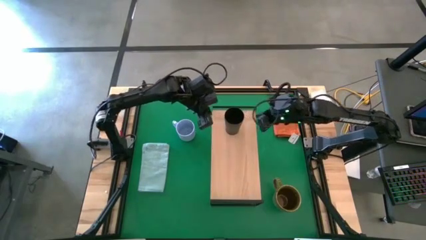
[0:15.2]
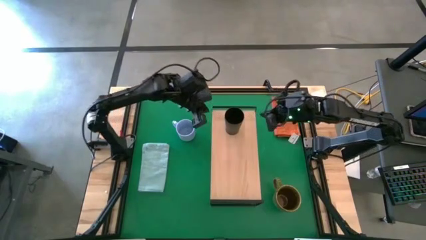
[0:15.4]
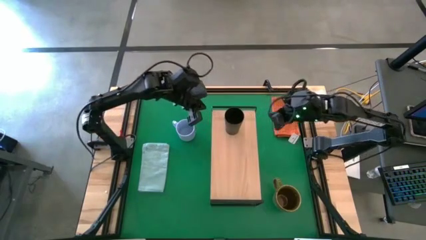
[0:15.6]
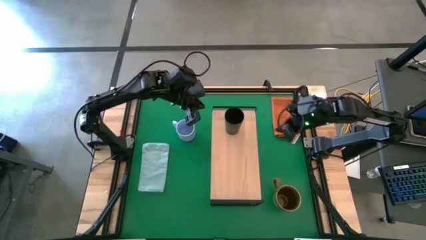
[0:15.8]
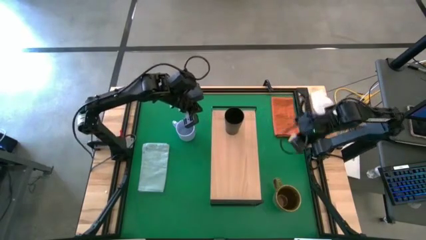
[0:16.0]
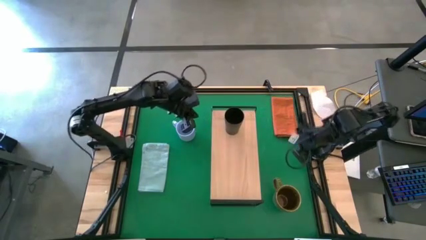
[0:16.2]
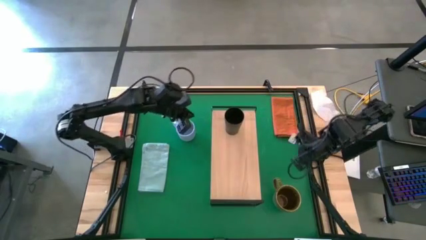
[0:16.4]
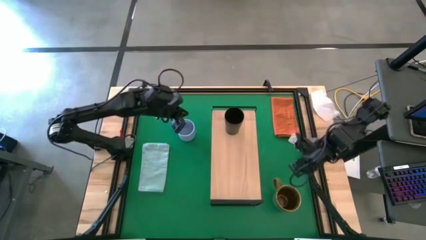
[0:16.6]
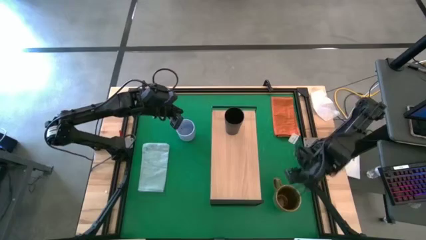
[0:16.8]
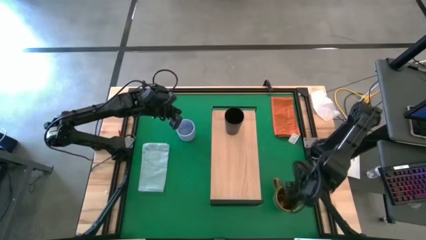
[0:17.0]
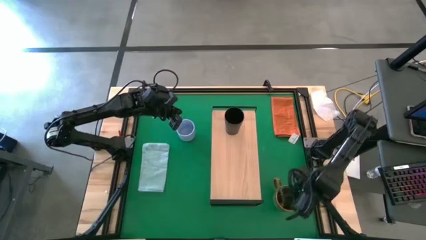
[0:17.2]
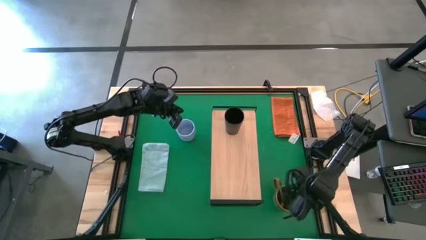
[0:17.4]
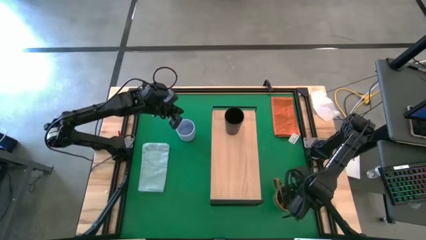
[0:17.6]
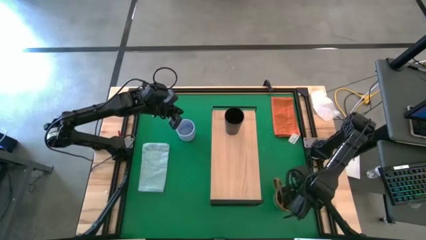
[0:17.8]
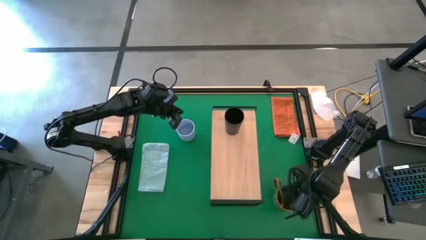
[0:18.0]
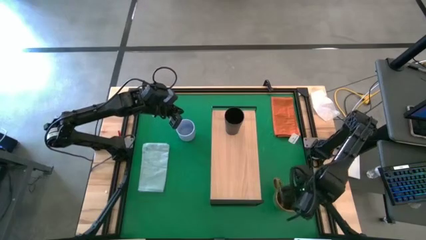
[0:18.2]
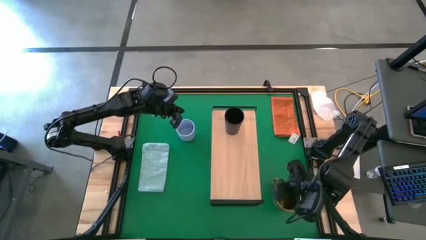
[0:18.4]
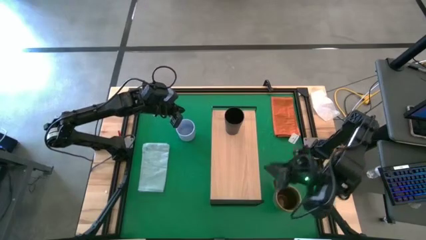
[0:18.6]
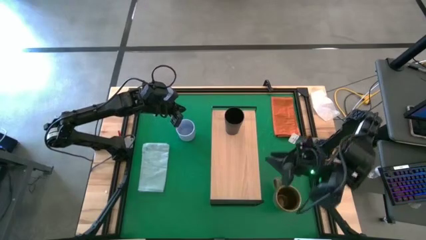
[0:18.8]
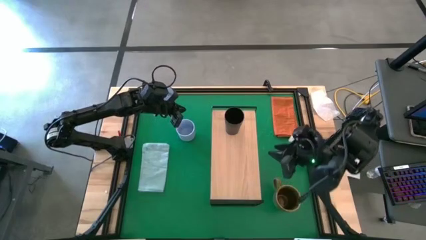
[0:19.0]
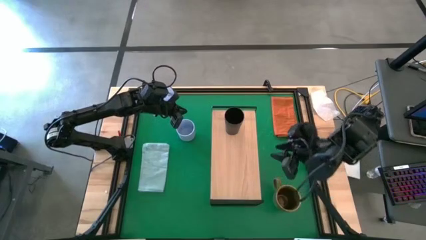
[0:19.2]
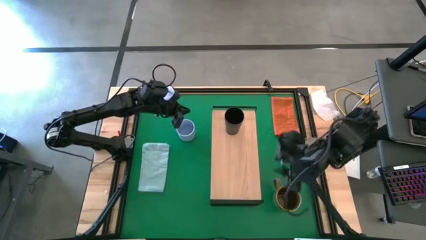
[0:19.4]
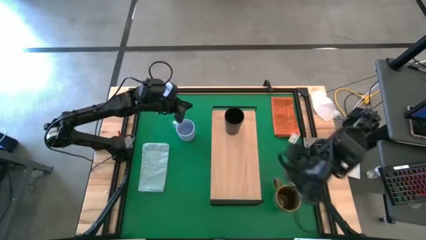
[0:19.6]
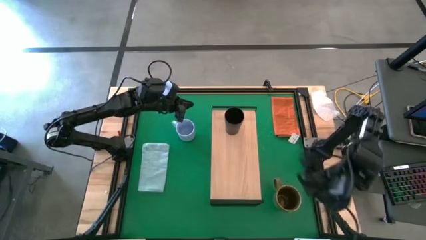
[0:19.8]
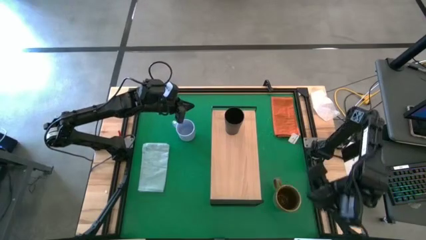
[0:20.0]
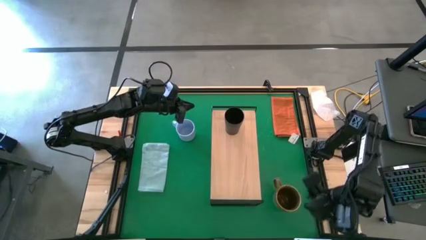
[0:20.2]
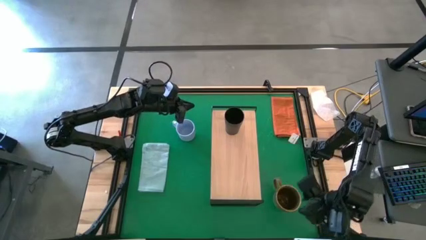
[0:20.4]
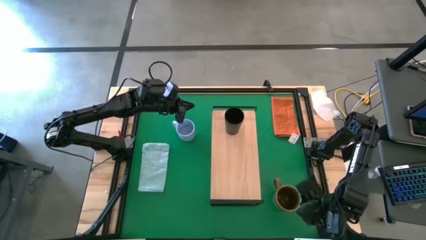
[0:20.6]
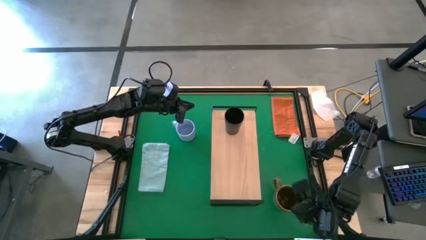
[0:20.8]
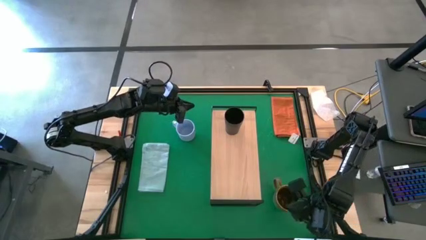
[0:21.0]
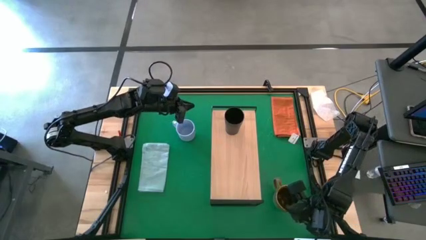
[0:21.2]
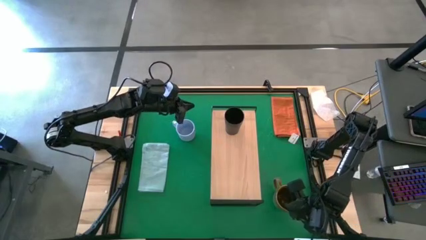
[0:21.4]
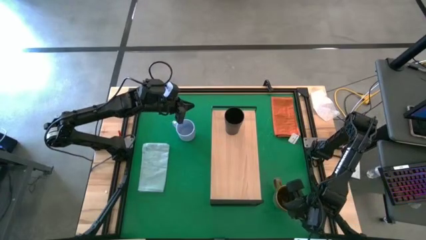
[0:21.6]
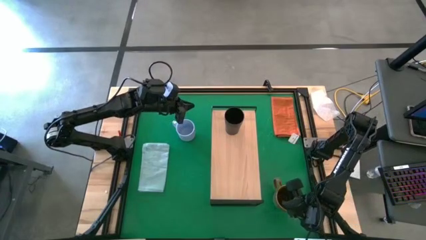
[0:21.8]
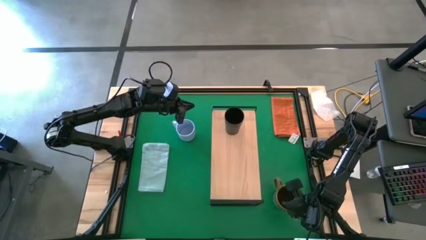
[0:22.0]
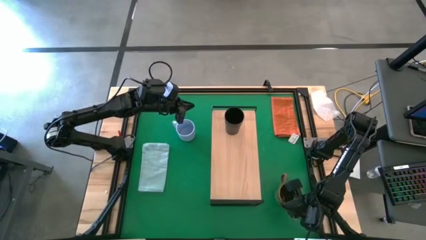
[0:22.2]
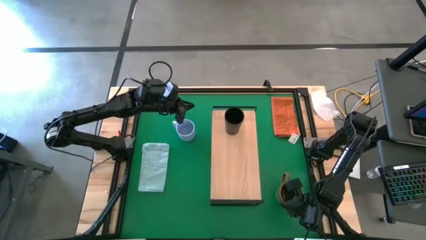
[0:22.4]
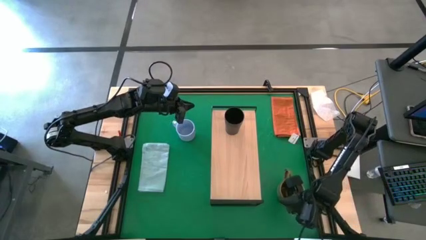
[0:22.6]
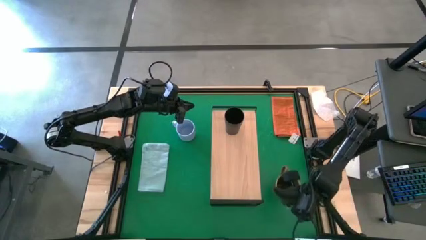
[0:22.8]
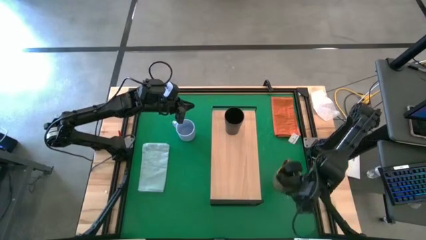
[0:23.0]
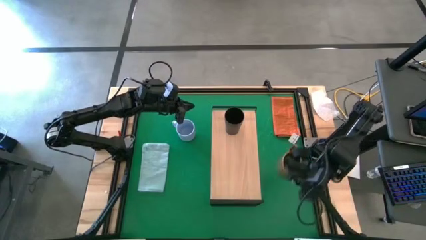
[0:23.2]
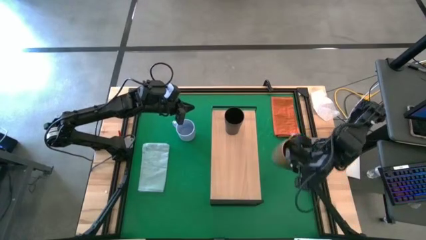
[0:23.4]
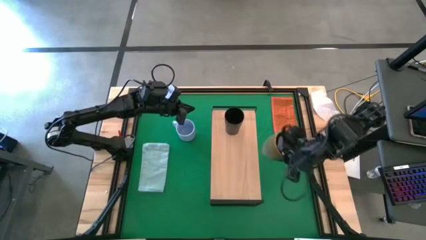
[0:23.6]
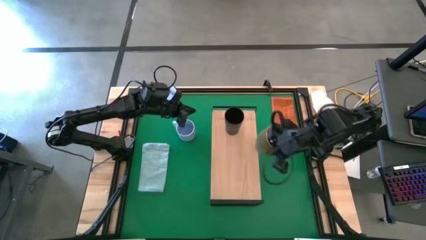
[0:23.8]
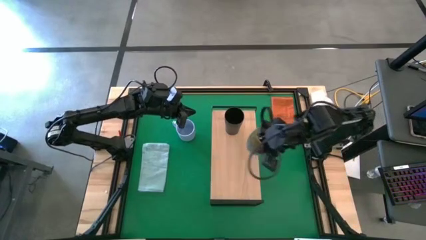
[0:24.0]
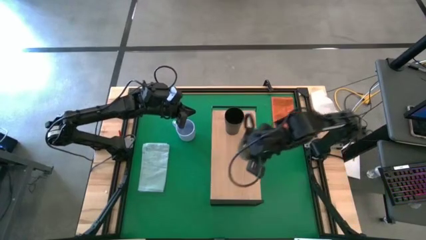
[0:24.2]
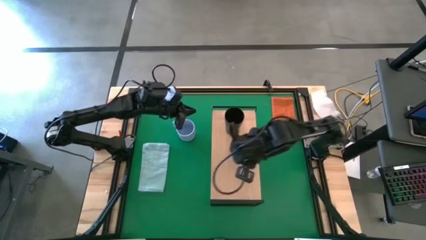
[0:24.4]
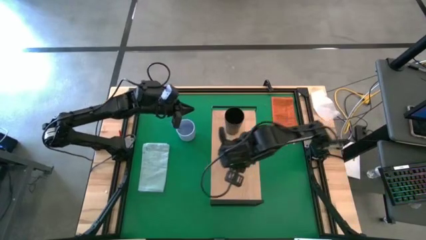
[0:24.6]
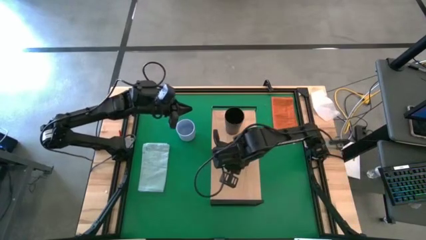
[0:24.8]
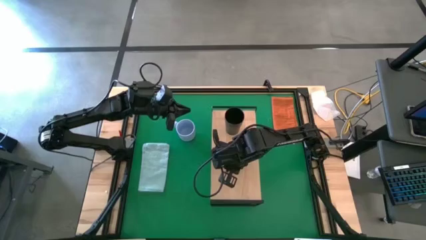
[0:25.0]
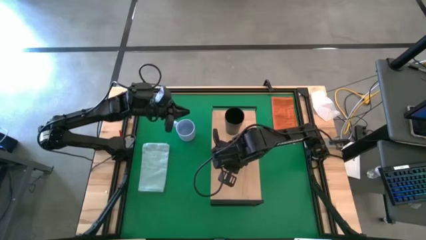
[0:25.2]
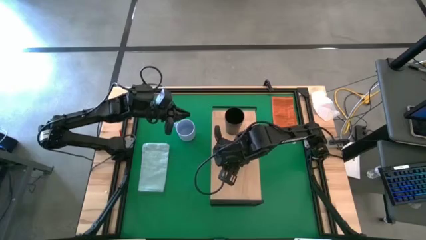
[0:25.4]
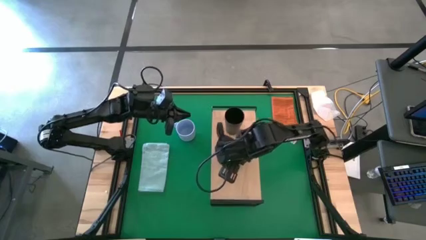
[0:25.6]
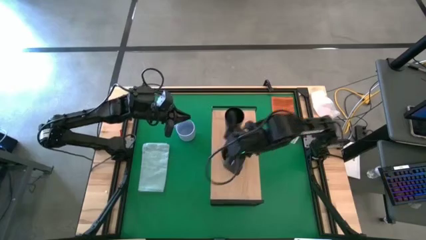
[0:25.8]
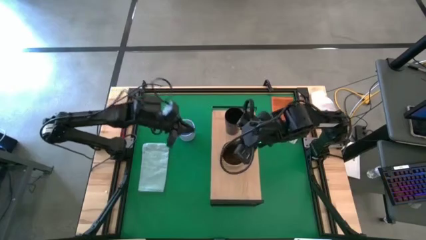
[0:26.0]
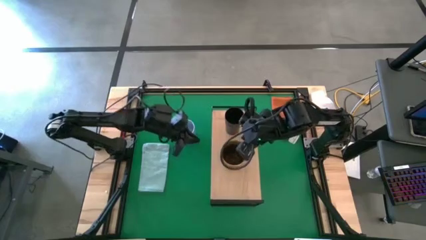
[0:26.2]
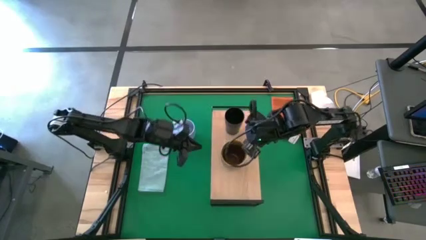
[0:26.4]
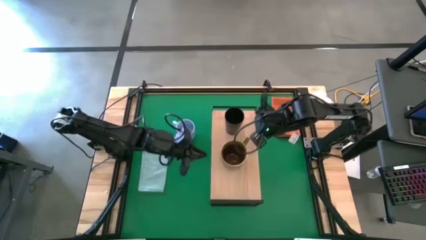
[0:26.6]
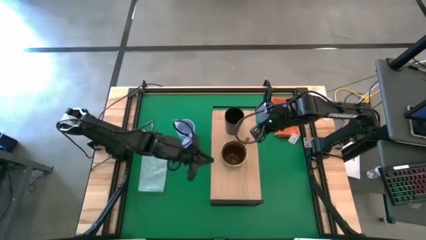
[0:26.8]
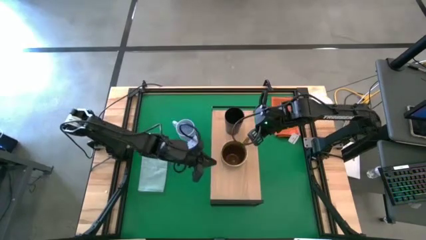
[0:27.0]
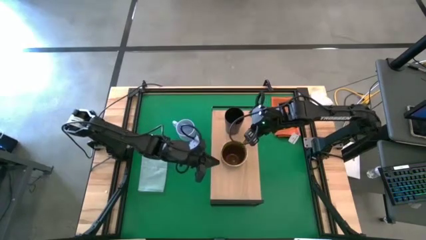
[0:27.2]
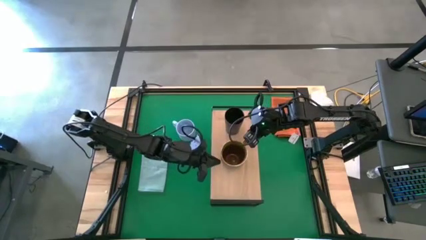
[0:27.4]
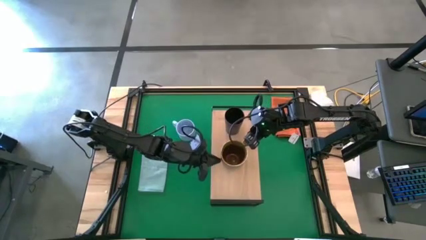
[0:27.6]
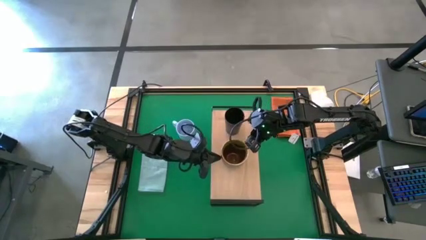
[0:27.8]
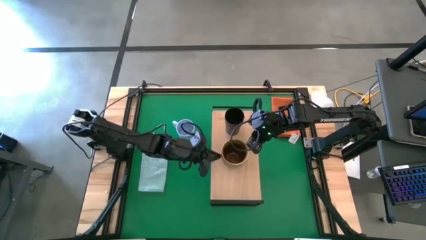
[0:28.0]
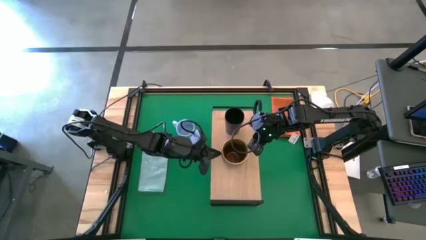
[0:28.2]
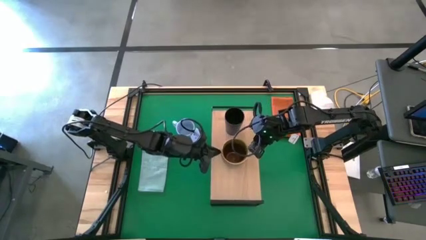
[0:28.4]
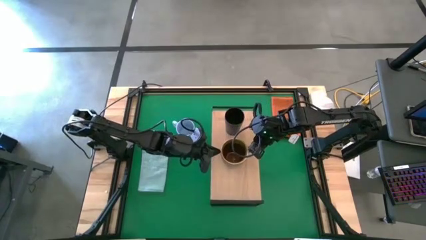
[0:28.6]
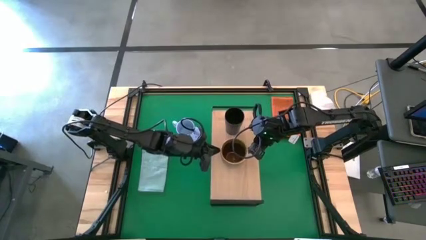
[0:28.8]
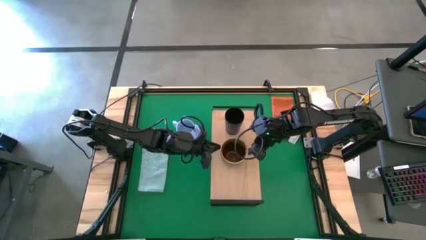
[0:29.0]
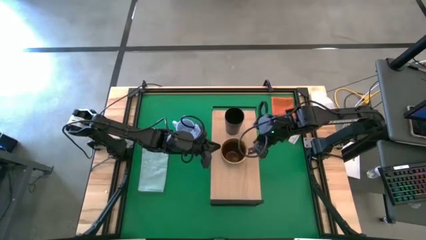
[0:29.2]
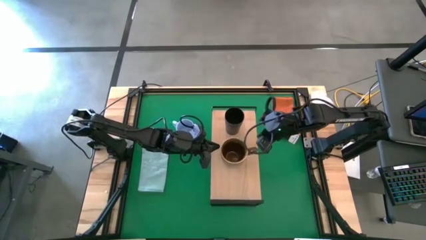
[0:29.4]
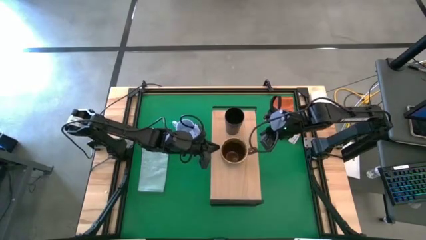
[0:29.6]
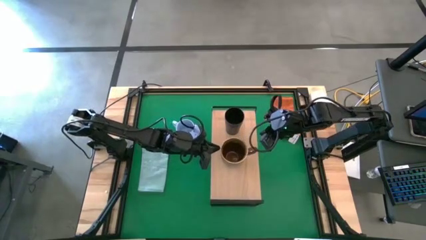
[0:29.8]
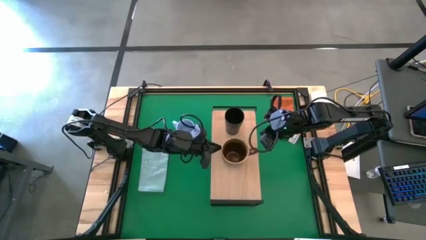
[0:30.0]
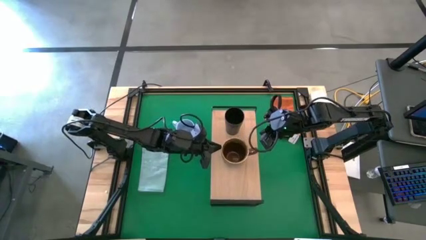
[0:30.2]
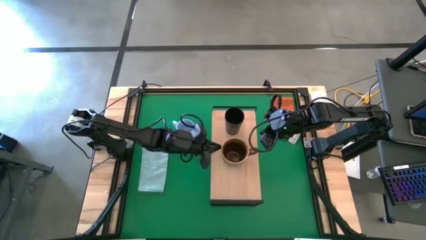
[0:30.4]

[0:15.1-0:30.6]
Task: Stack small to large cups/mugs on shelf
Put the green cup on the shelf aligned with the black cup

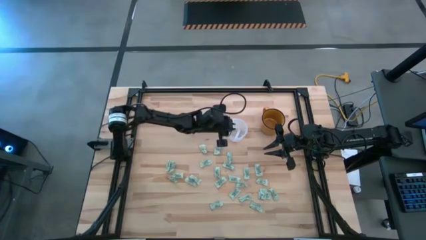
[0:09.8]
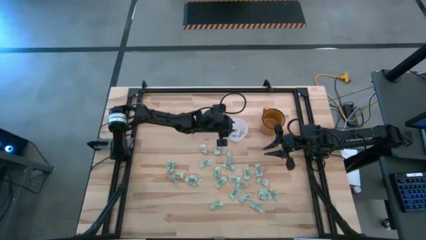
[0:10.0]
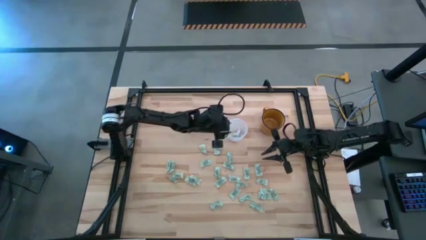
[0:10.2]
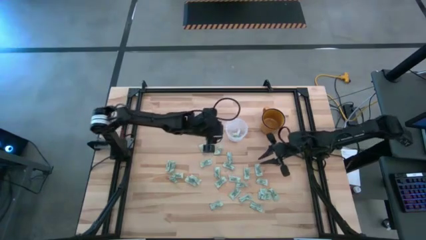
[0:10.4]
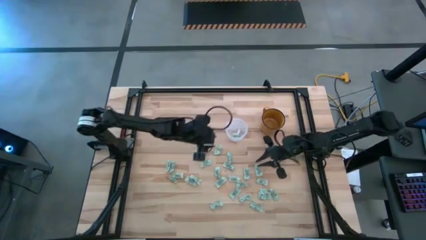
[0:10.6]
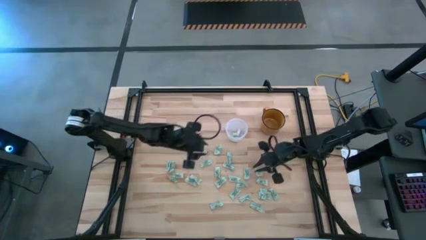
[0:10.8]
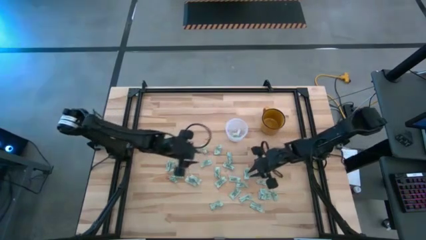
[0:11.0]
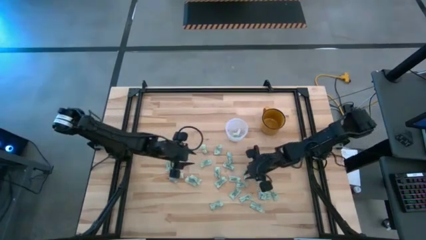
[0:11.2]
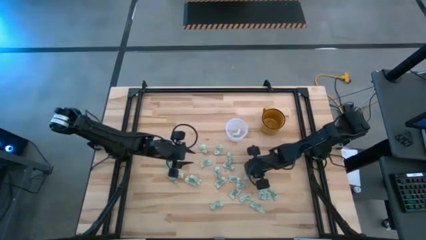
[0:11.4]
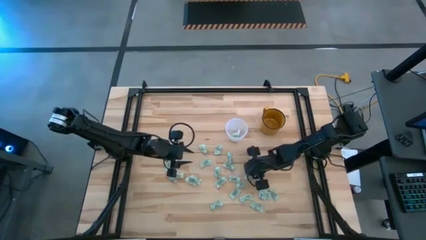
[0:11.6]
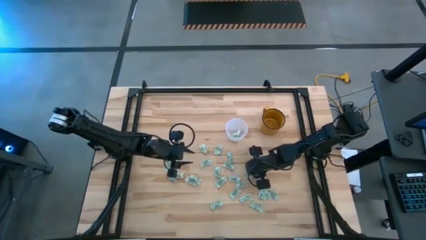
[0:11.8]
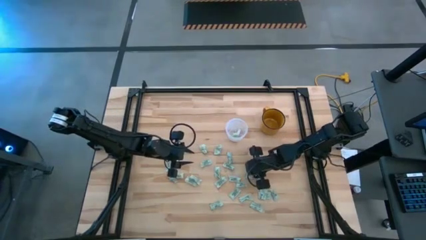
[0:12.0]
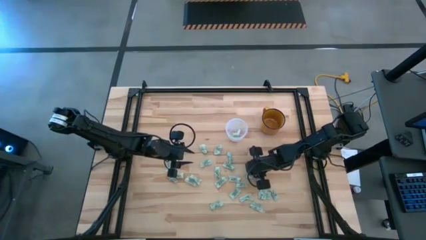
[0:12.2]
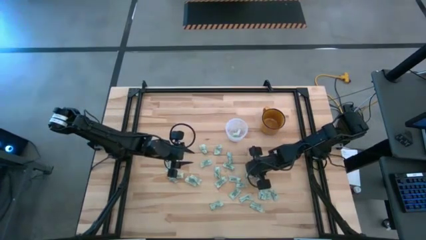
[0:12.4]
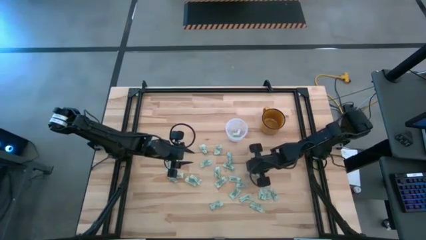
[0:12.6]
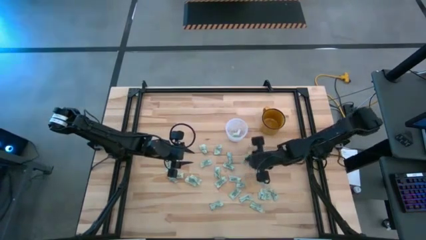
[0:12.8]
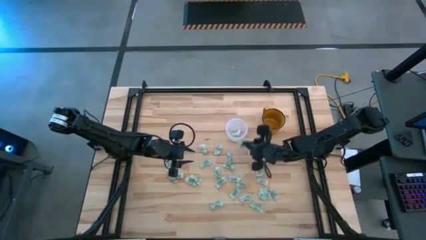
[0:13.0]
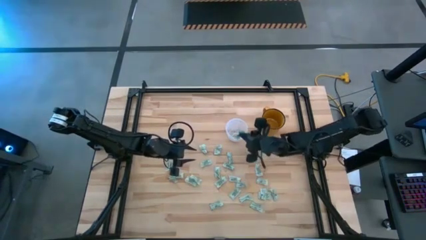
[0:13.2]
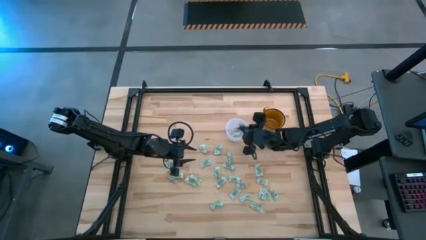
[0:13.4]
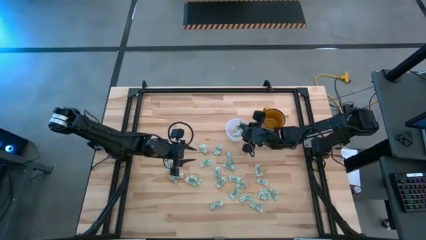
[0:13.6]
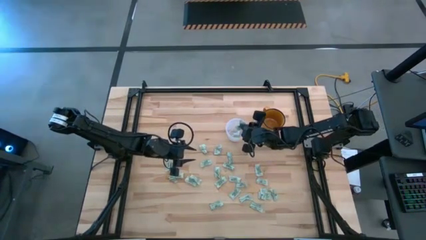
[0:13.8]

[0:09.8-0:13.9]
Task: Pick and place Stevia / Truvia into bins
Put the green stevia packet into the transparent bin
